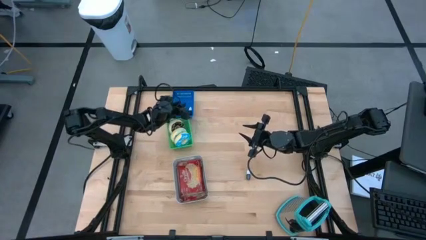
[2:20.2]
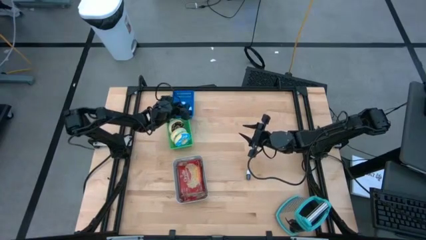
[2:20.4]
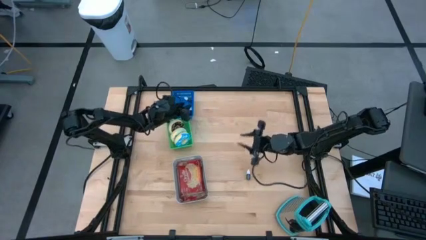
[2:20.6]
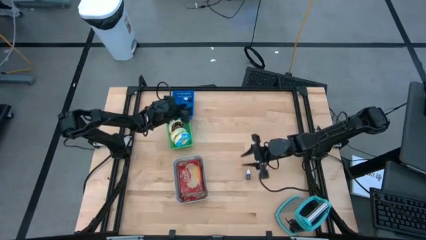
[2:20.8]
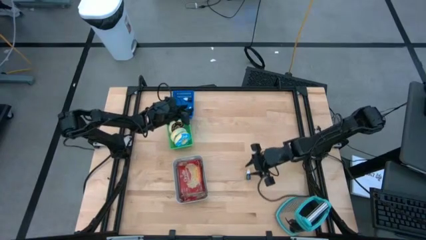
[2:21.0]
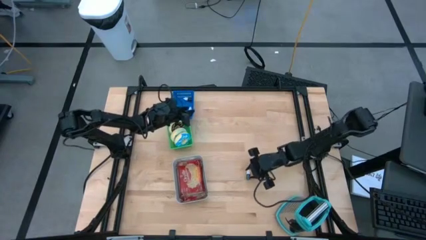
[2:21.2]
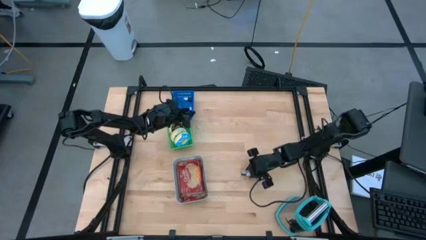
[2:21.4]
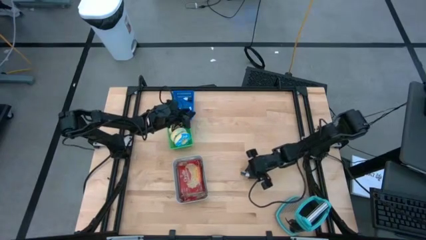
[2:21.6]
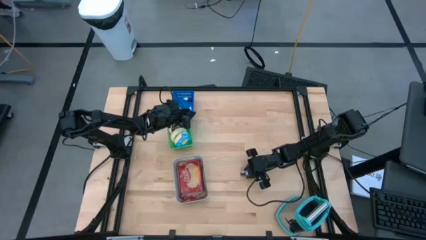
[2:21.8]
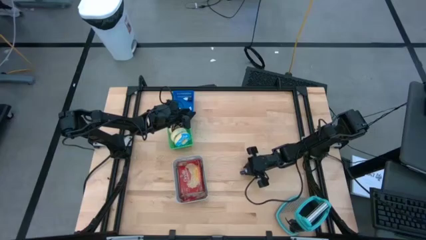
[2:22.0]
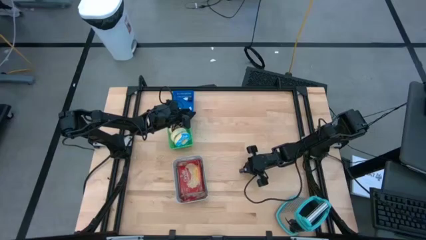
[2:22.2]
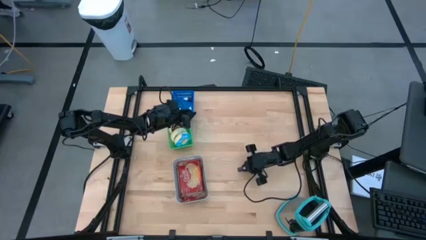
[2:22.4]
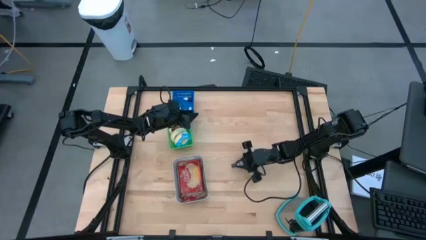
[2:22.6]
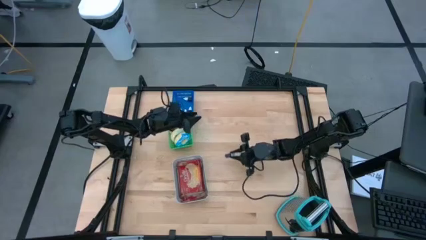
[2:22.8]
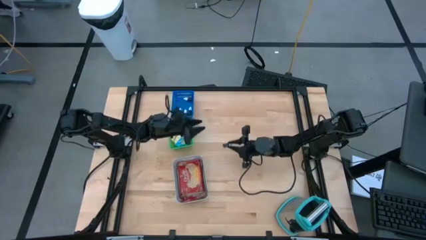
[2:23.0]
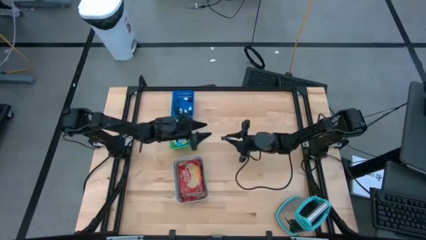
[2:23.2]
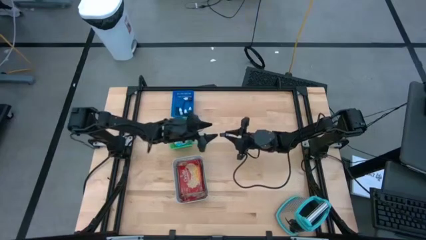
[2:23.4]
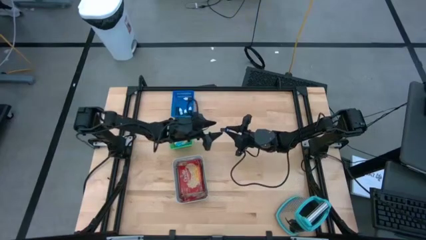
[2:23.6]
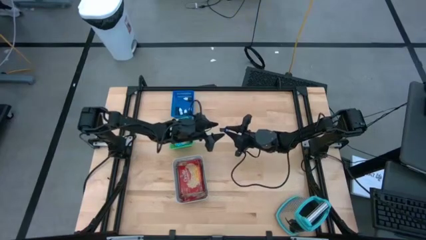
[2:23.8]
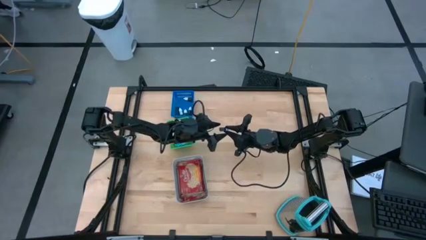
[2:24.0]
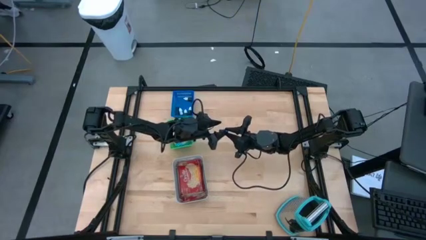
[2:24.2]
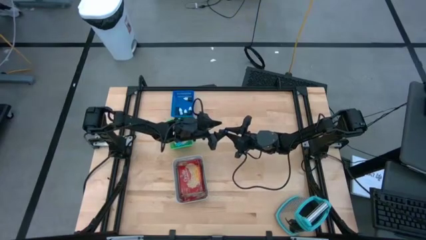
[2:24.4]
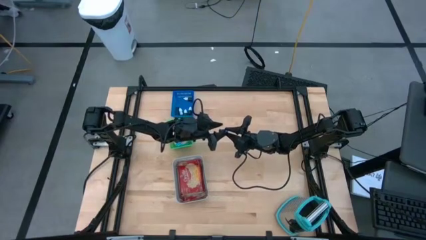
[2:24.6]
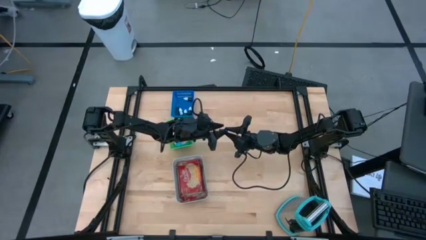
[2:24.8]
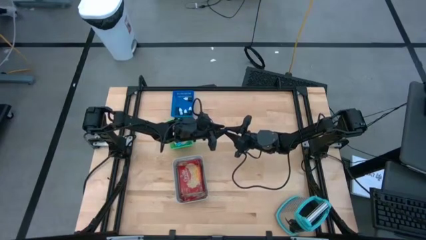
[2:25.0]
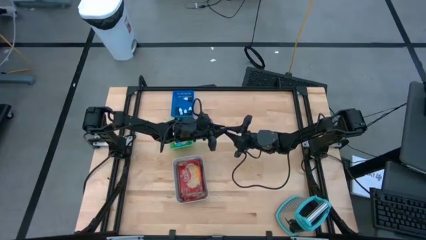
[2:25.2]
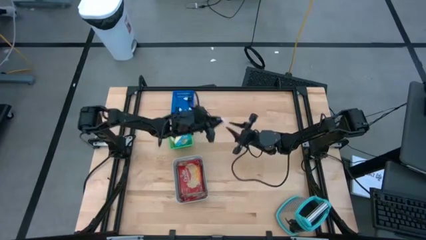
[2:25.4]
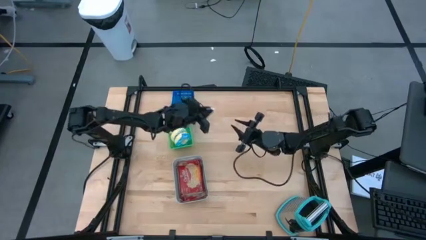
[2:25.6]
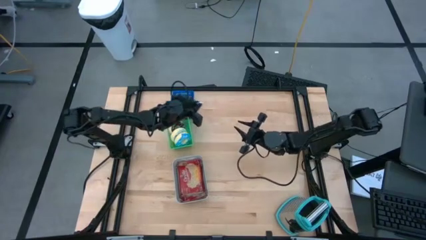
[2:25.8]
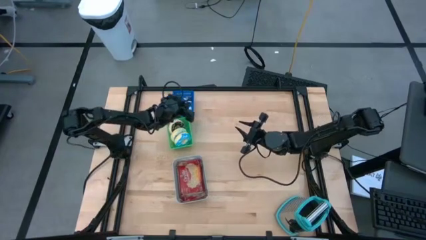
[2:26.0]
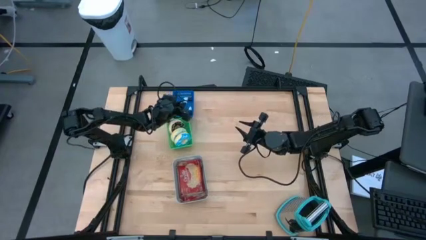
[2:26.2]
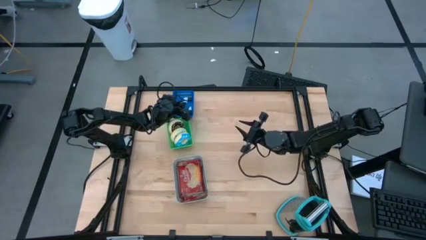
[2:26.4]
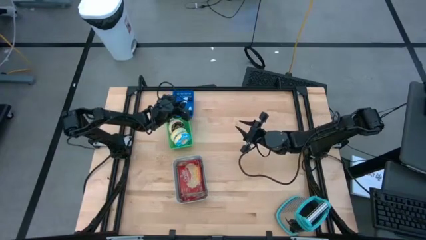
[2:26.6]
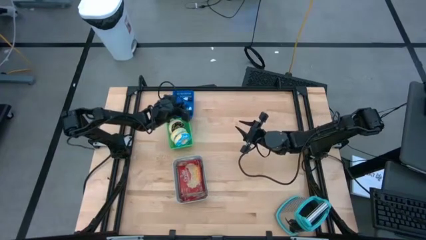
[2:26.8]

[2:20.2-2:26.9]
Task: Pick & Place Food Item
Put the black food coloring bottle into the blue bin

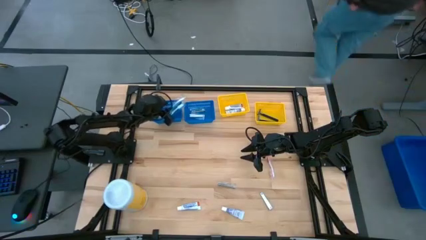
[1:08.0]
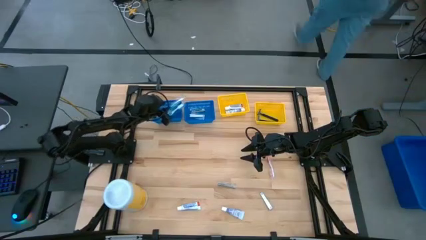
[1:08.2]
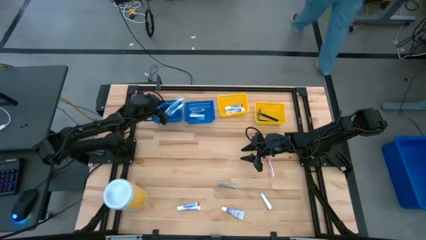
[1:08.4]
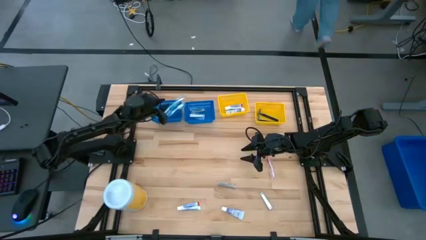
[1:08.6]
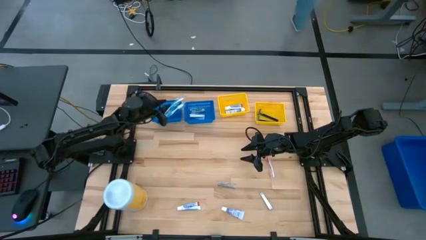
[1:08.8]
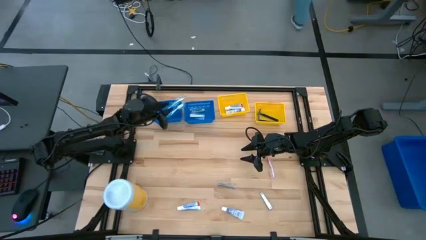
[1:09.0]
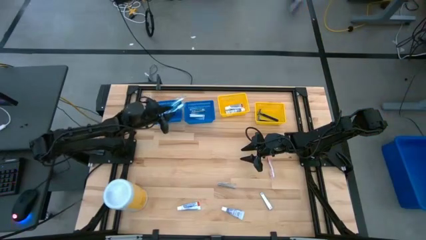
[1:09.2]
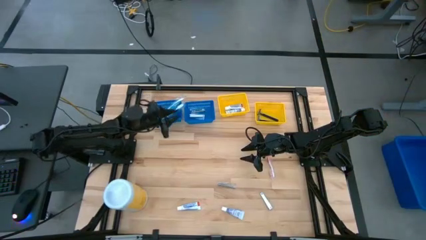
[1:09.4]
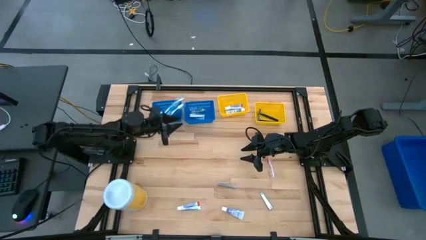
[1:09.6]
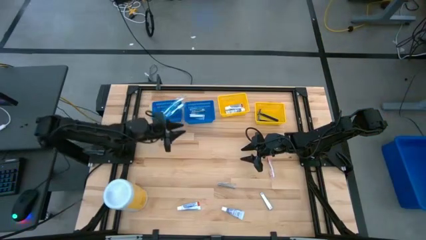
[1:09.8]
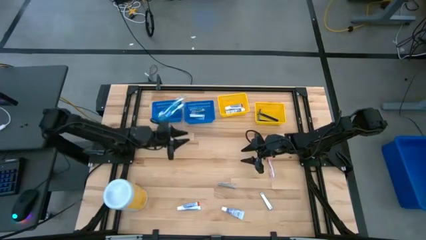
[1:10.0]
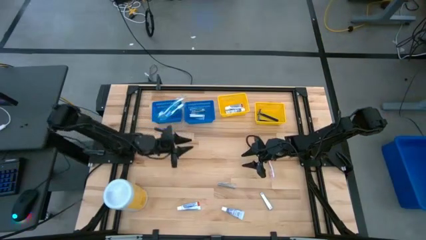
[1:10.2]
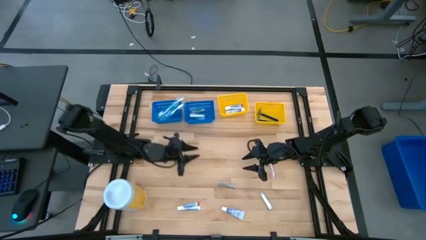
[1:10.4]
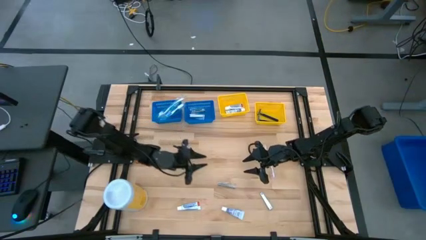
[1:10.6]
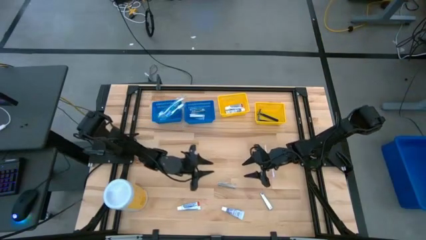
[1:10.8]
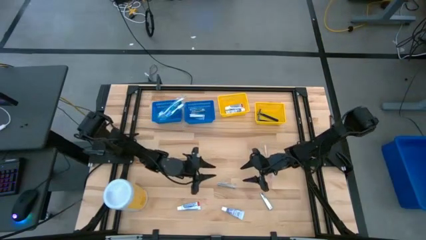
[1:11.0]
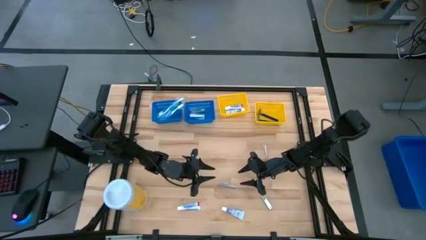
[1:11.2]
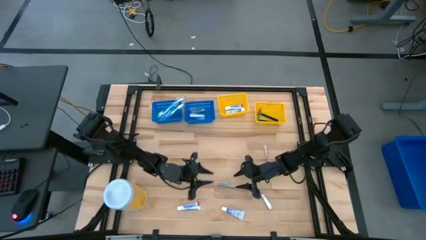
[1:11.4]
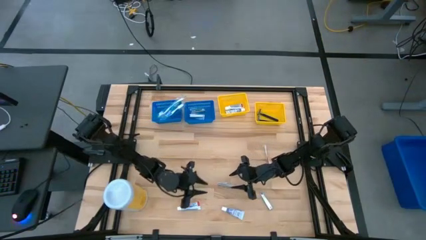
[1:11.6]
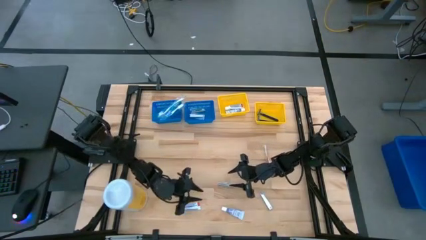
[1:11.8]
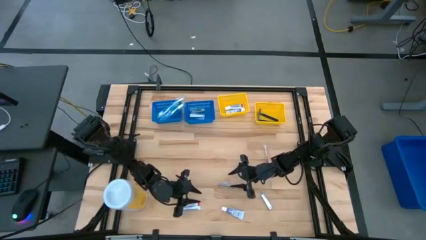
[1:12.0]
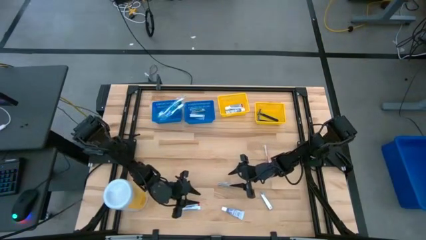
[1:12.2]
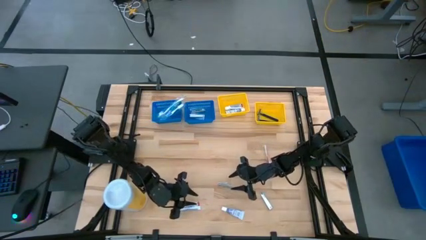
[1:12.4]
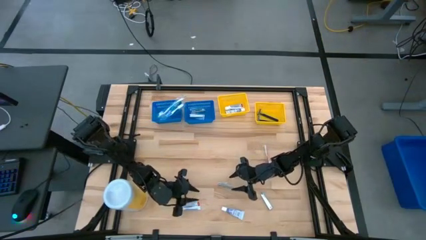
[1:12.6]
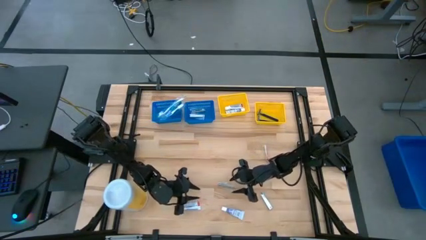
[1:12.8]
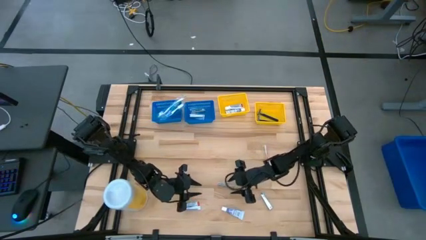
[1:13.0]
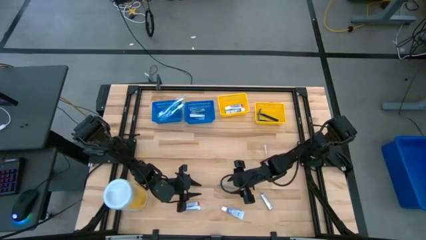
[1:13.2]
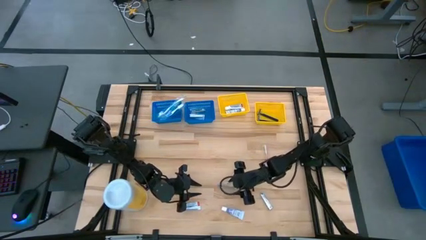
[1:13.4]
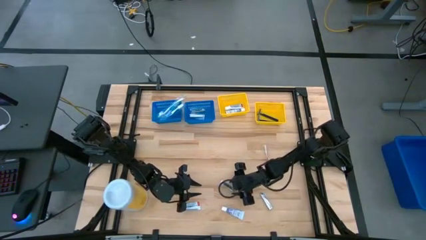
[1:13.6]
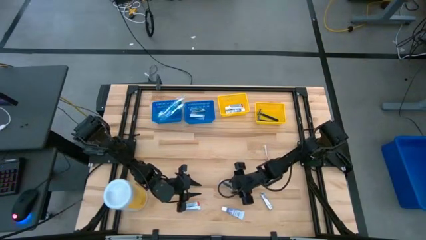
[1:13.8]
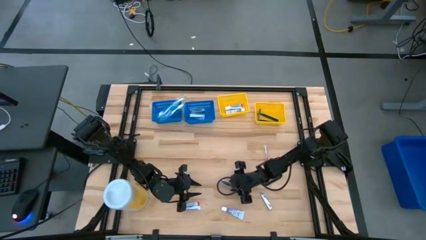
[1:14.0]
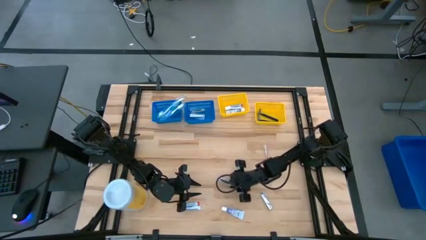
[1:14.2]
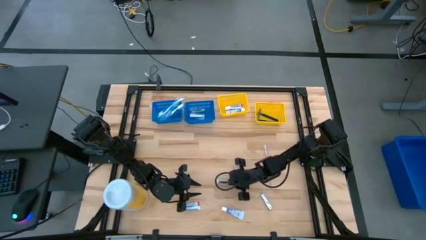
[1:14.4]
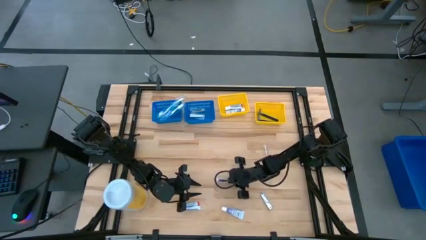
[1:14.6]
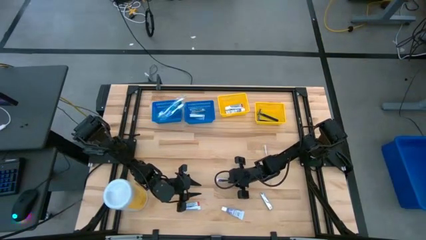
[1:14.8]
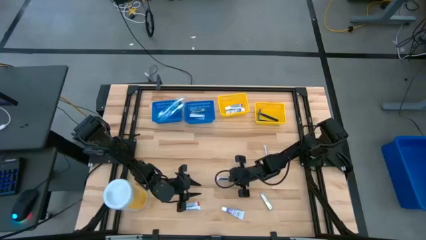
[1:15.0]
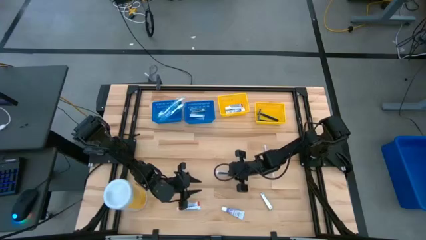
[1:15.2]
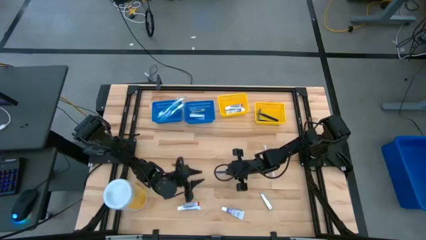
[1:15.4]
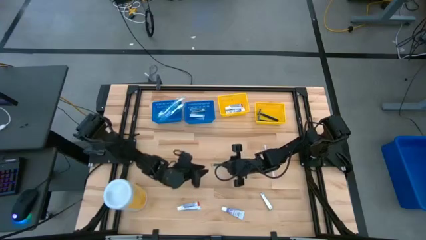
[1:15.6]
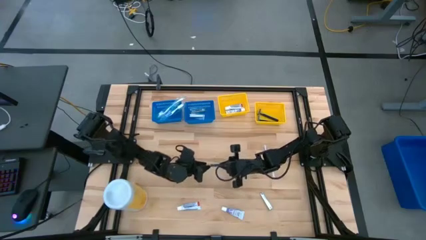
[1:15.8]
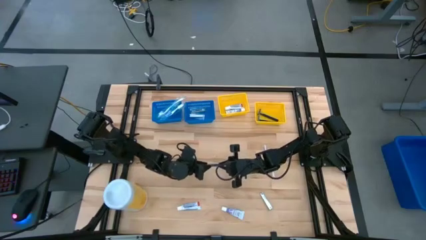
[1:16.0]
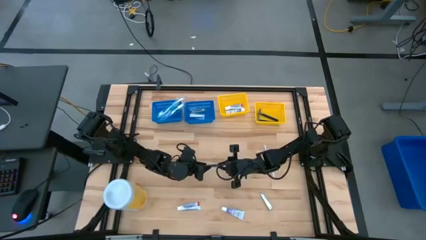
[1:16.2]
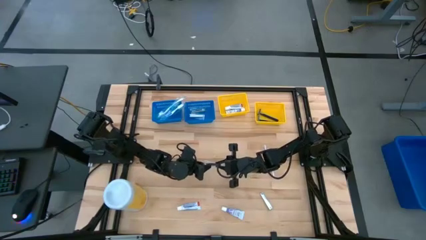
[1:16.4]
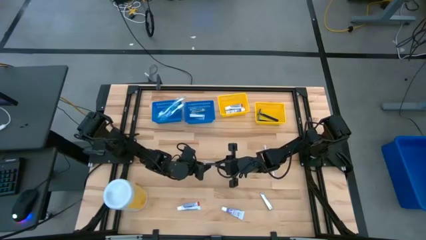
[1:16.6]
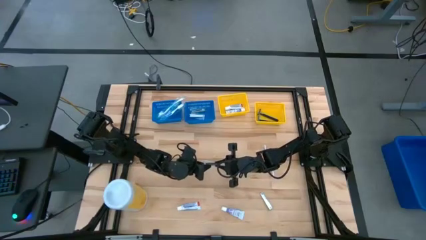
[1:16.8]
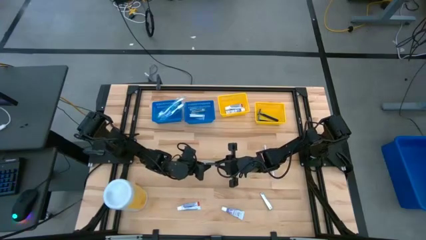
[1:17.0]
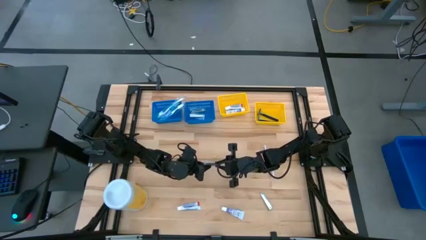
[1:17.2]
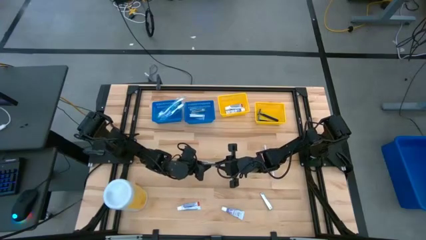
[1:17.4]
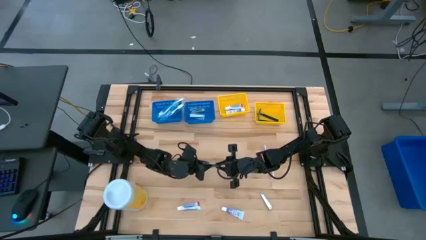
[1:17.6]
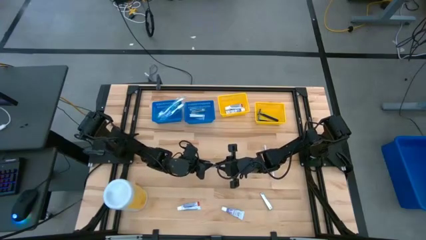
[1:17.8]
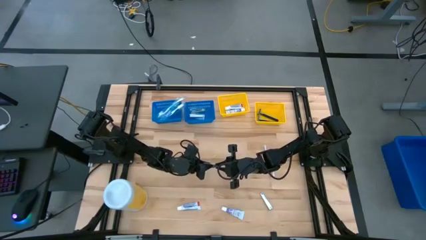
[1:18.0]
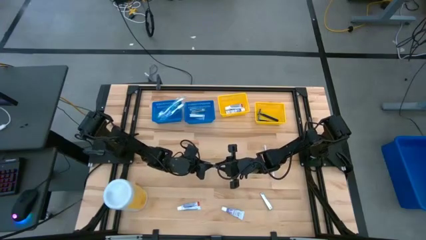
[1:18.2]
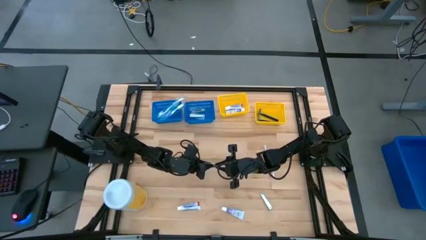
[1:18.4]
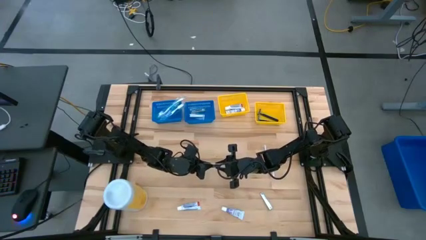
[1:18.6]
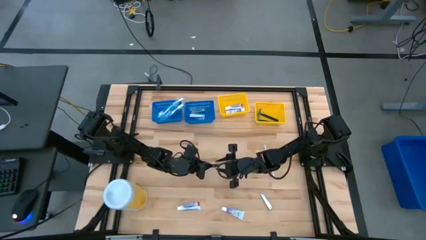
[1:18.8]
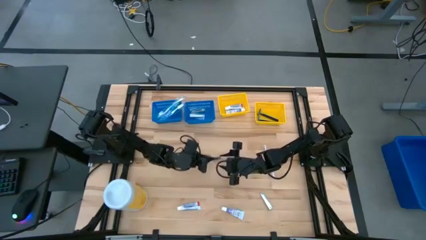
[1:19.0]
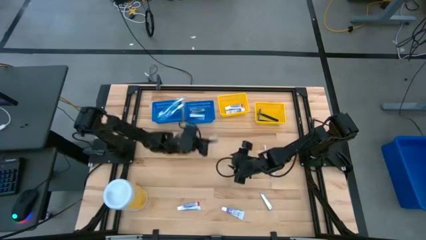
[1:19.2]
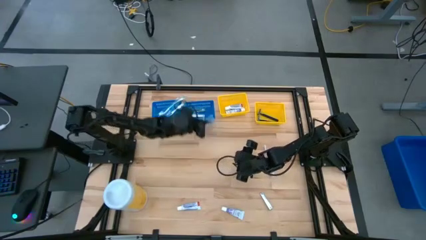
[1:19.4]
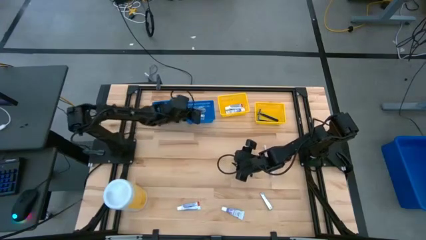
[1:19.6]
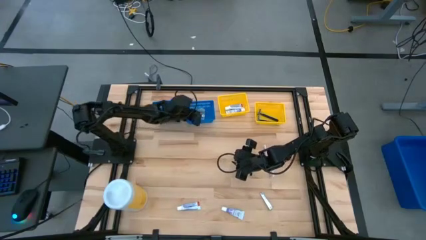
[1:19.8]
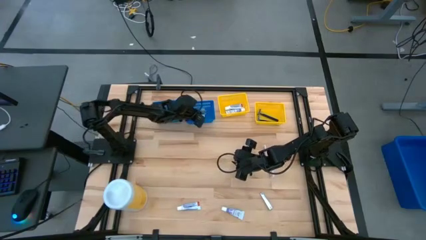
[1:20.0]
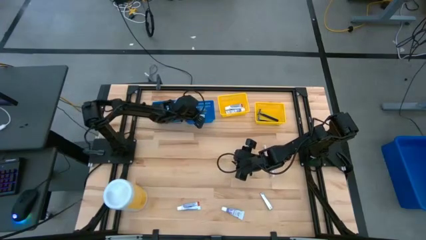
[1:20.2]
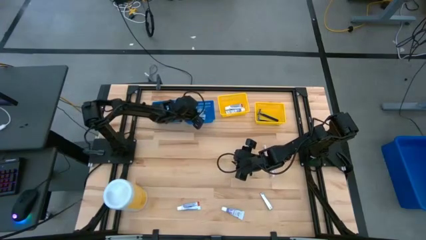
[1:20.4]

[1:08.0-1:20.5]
Task: Pick & Place Travel size toiletries
Put the silver nail cutter into the right blue bin
